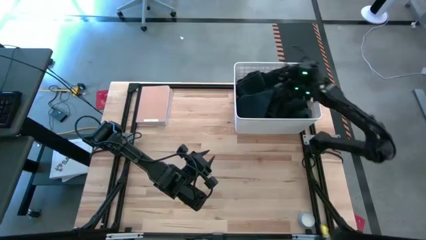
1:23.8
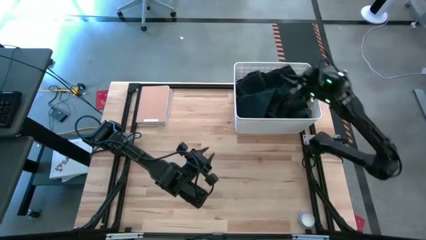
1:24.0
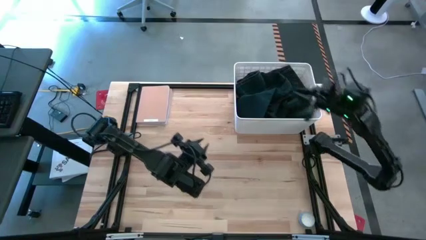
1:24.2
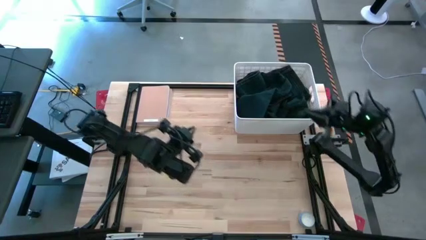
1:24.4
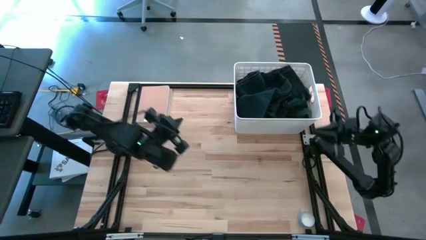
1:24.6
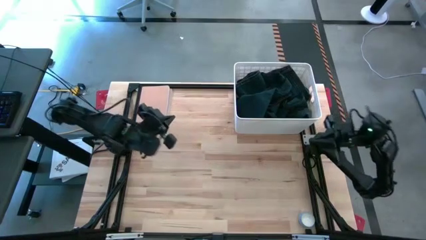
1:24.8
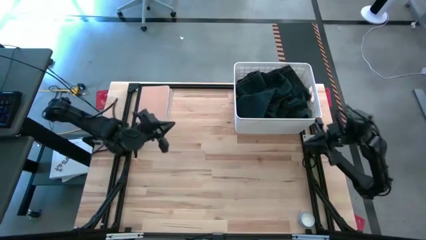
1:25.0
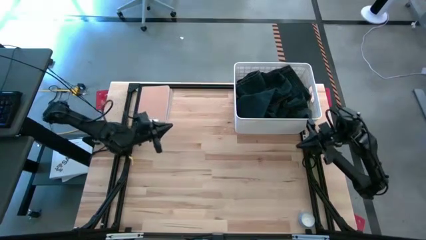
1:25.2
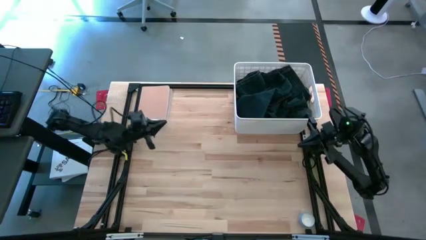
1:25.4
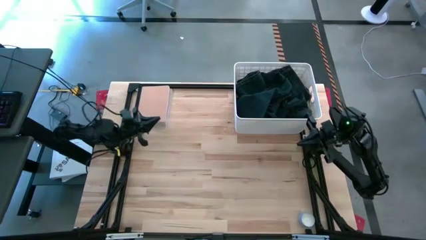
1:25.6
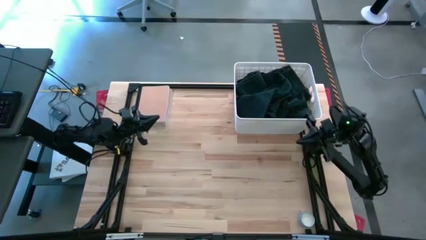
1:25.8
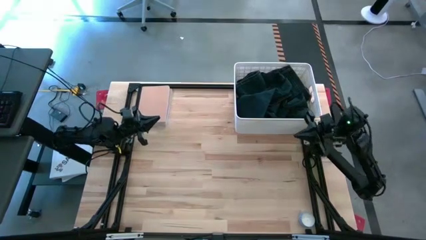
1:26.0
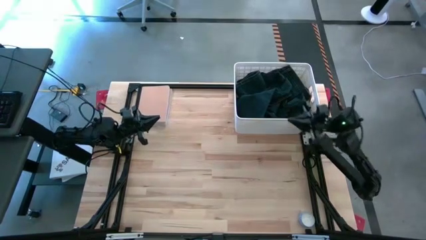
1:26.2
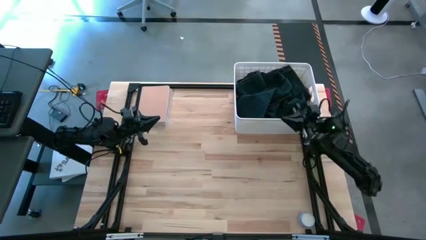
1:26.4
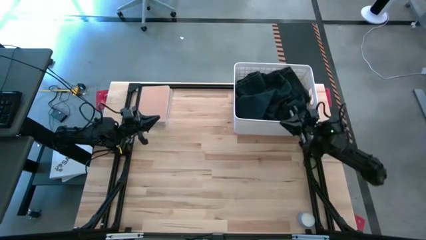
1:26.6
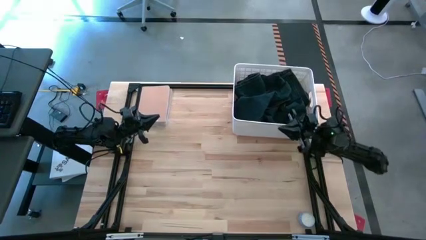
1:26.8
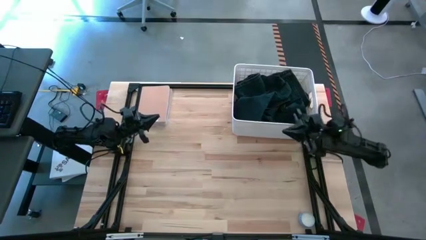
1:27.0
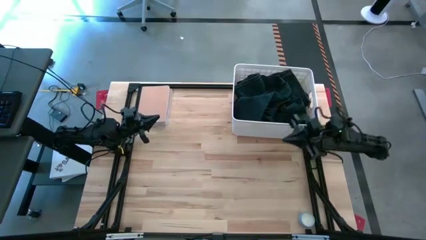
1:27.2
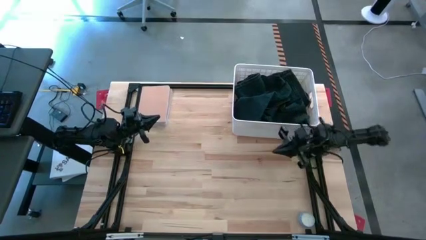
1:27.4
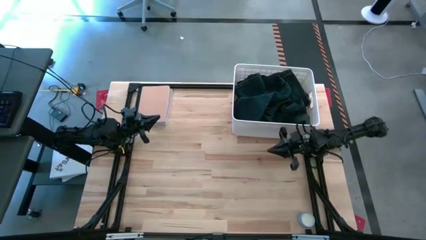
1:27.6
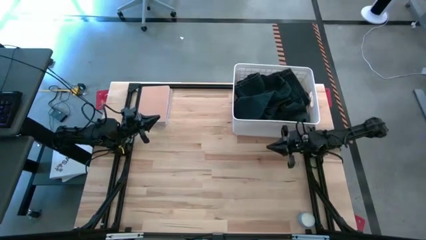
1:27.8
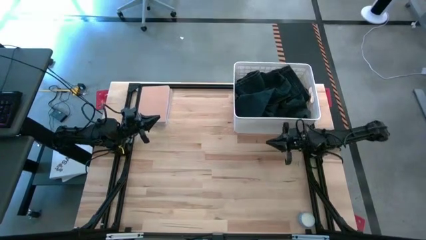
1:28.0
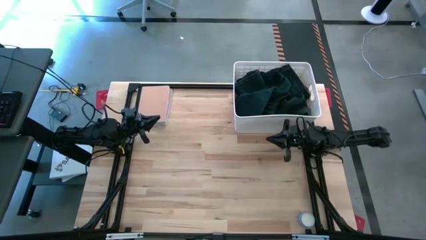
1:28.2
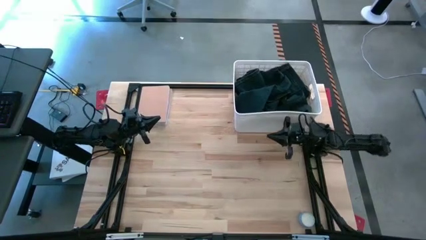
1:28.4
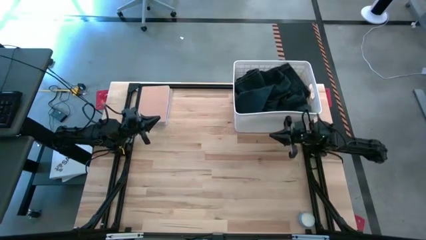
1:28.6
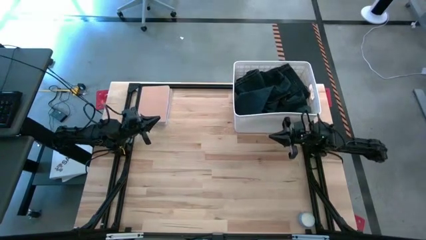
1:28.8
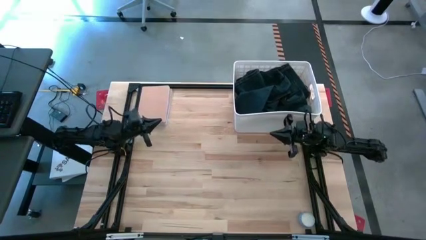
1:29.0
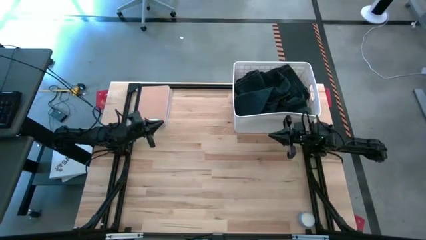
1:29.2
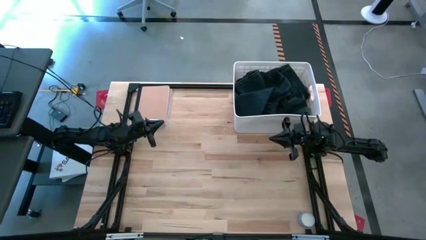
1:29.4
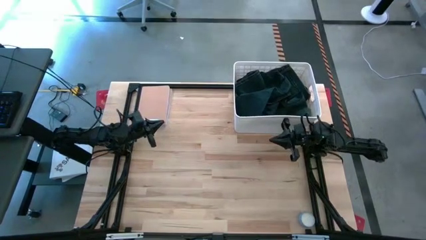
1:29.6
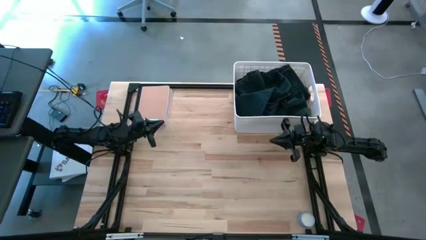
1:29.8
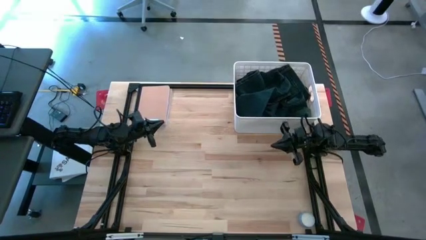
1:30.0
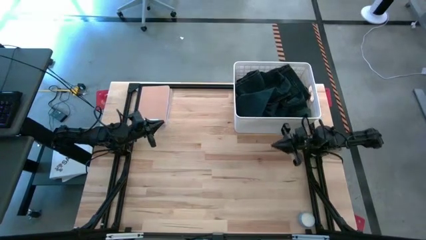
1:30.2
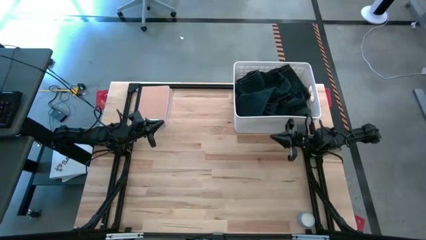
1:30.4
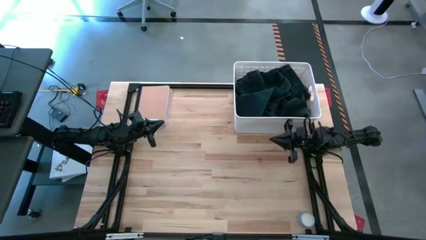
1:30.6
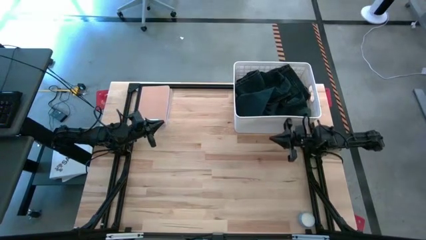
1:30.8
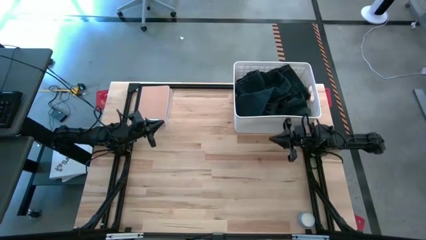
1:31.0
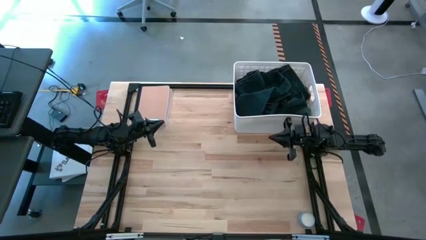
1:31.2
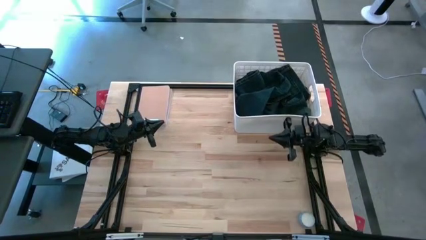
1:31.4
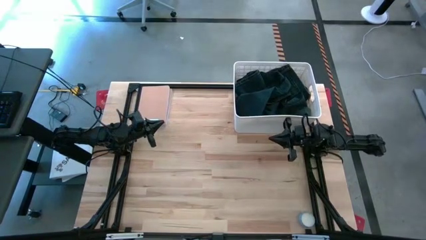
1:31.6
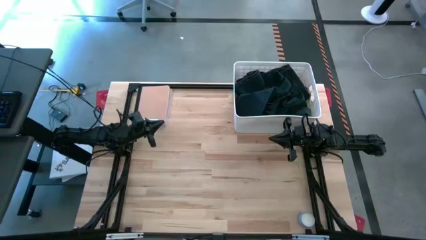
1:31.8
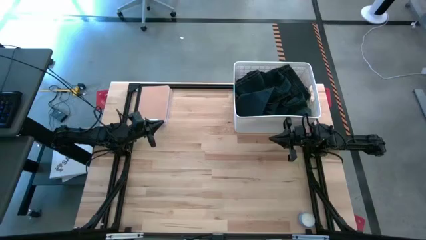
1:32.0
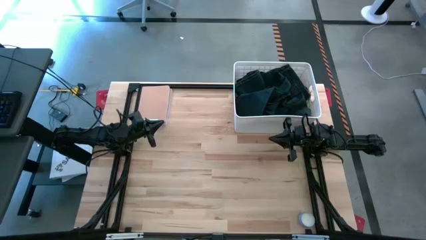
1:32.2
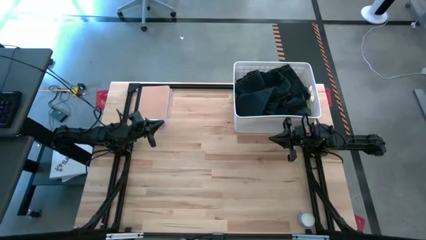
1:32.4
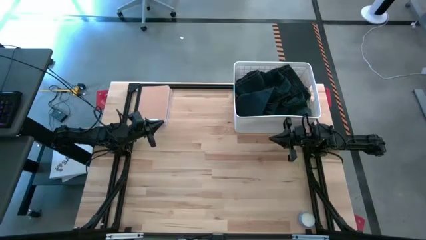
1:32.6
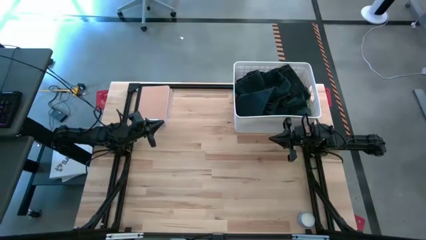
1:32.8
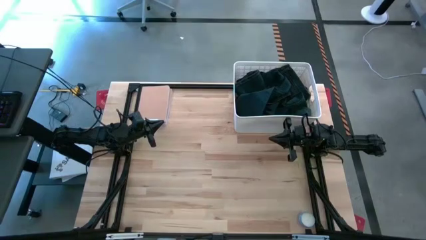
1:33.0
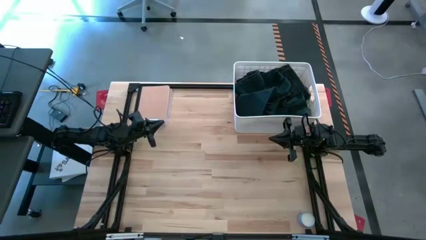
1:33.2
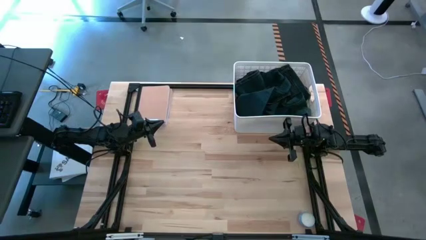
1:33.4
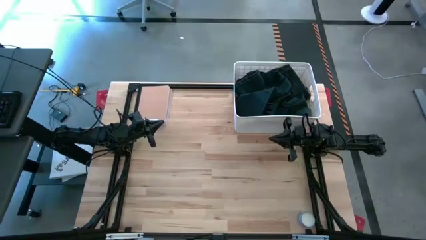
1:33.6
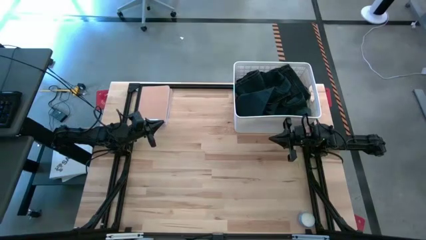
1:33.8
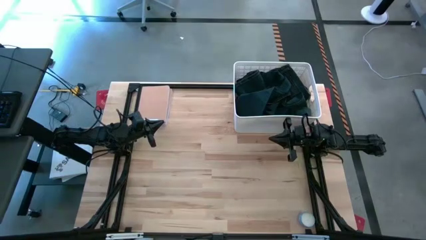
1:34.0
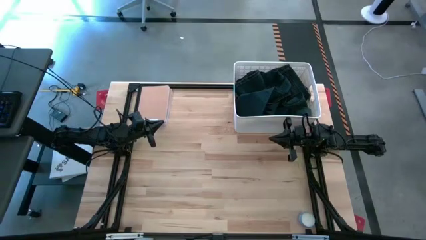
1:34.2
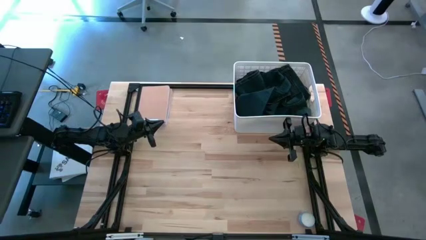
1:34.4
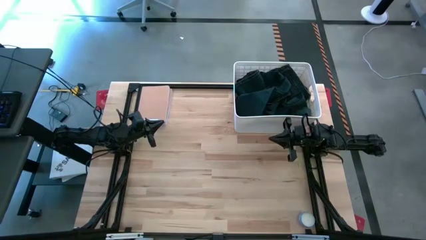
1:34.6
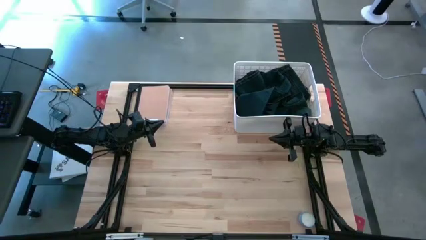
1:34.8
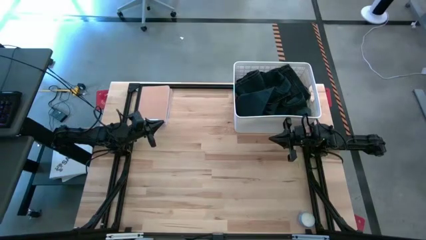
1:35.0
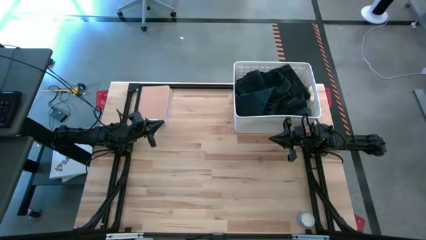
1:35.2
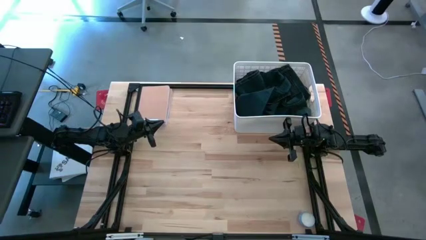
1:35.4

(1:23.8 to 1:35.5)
Task: Sort clothes
Return to Home Position

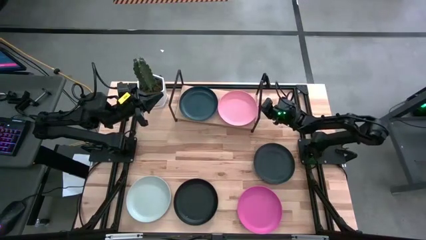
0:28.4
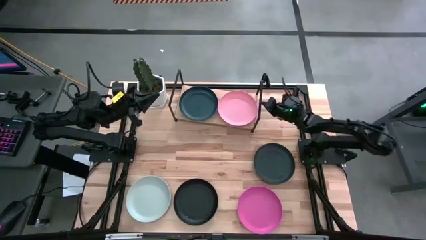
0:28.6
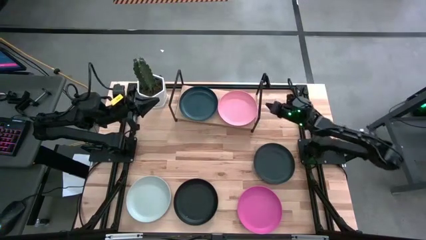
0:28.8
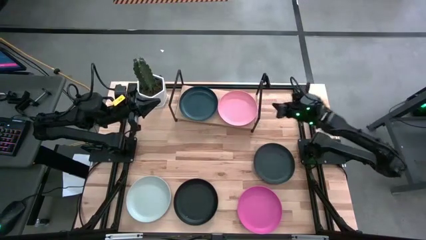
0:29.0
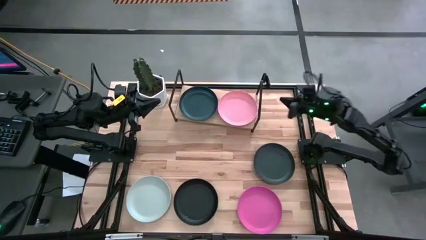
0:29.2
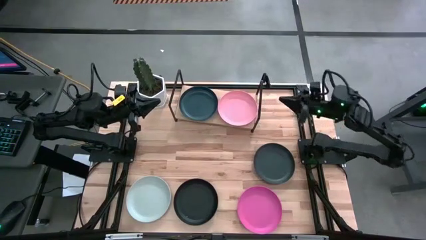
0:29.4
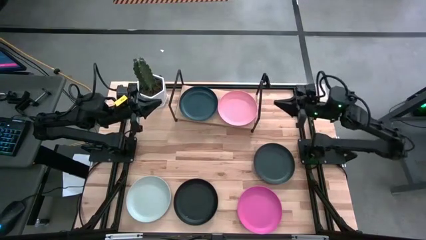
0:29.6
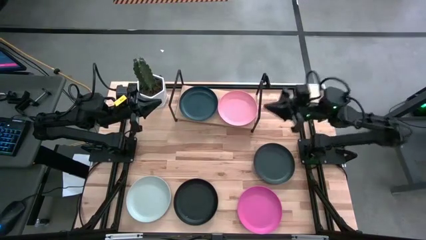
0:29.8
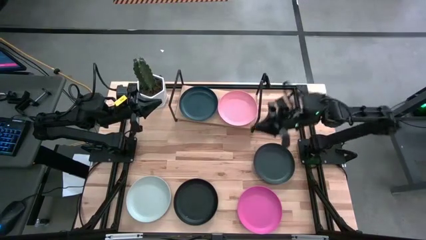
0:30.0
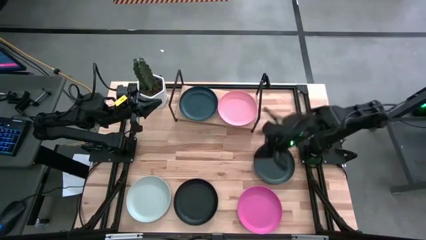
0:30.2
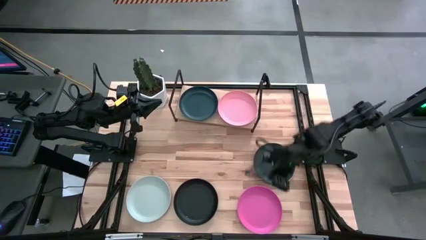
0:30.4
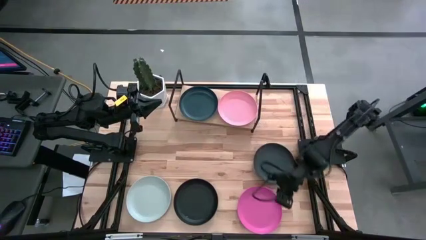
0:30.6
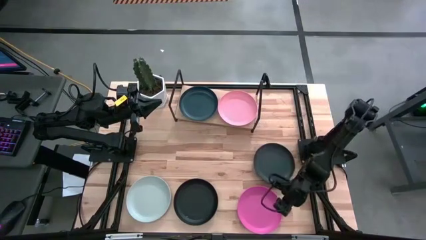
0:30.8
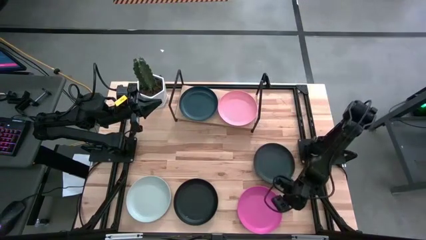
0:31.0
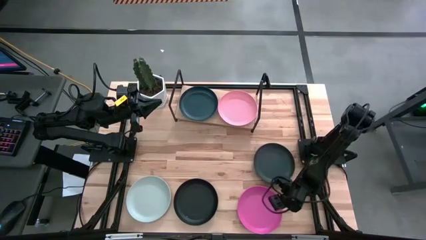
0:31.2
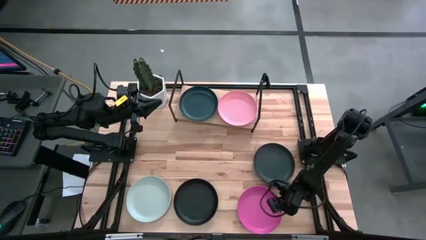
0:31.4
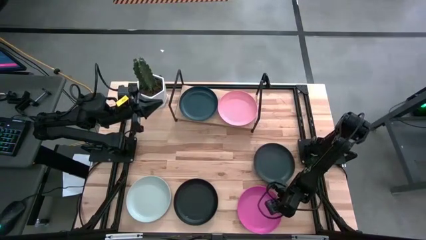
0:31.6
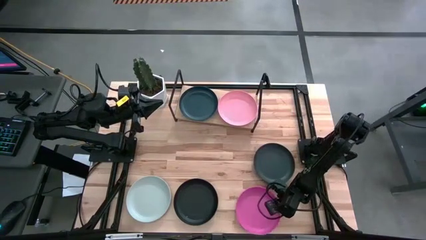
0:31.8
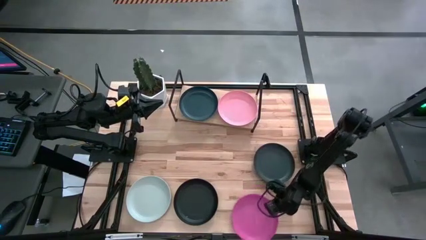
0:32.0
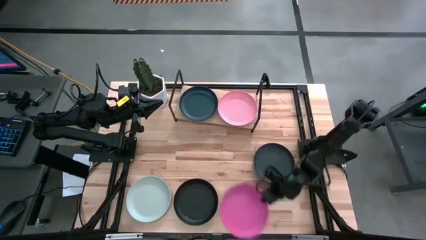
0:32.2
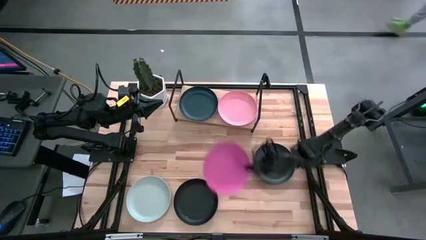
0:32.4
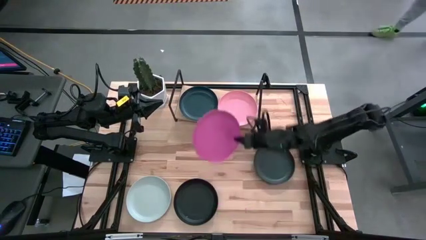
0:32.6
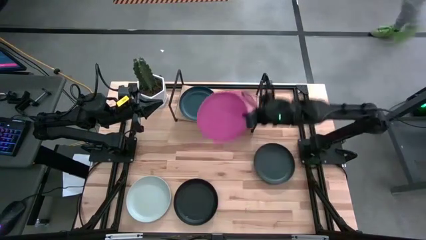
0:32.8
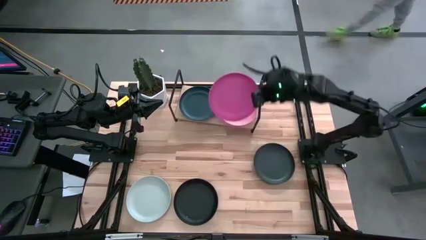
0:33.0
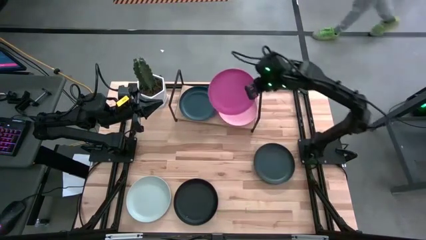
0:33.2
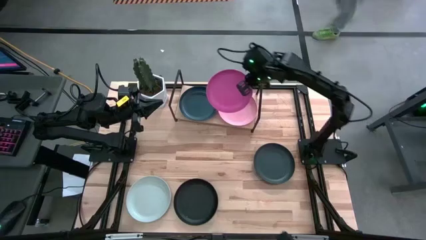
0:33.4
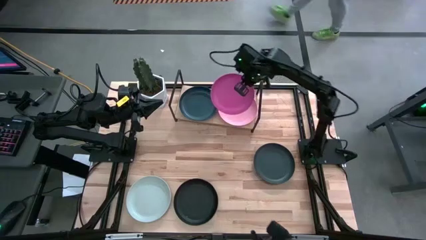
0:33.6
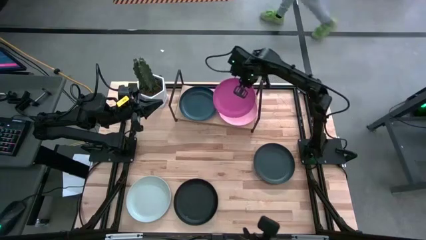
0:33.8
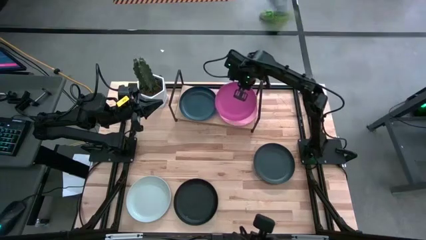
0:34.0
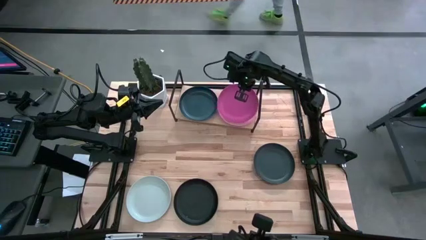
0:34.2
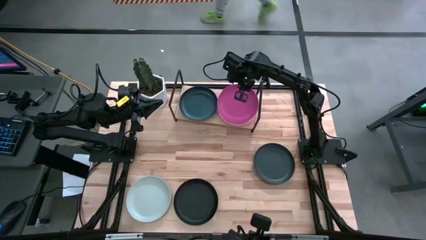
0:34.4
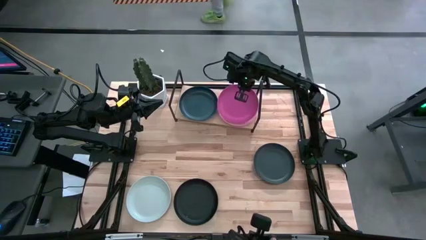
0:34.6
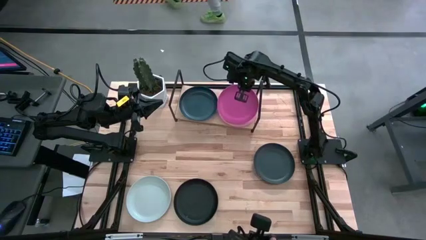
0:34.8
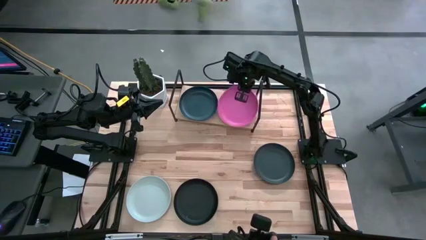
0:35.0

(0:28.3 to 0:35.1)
Task: Place and stack plates onto a shelf
Stack the dark pink plate on top of the light pink plate on the shelf
